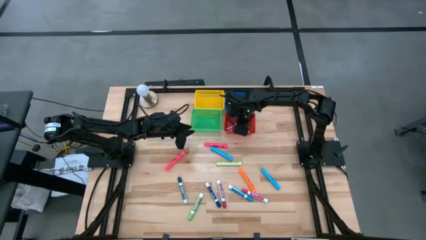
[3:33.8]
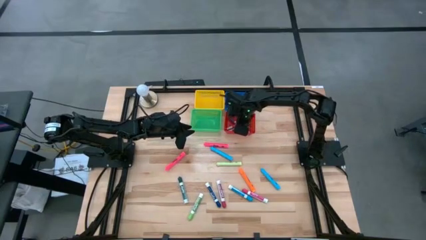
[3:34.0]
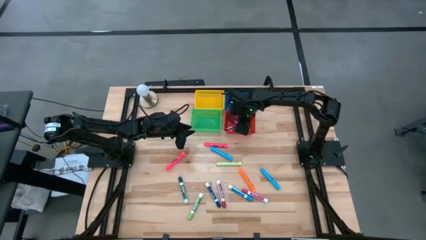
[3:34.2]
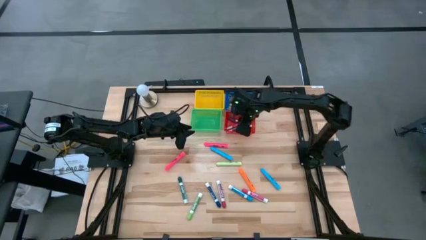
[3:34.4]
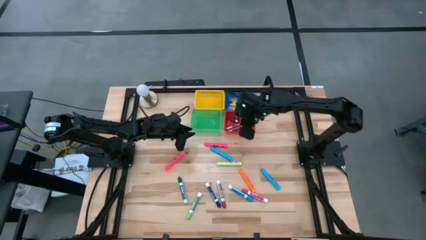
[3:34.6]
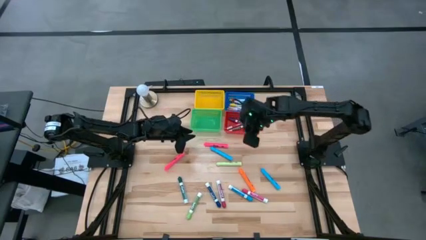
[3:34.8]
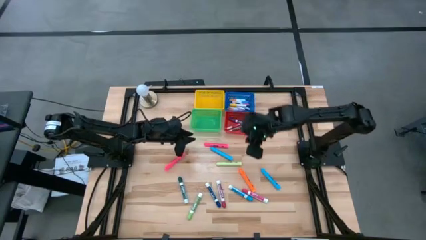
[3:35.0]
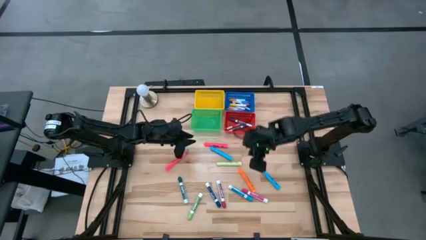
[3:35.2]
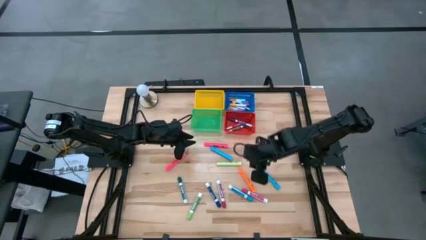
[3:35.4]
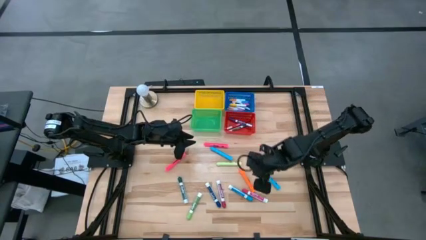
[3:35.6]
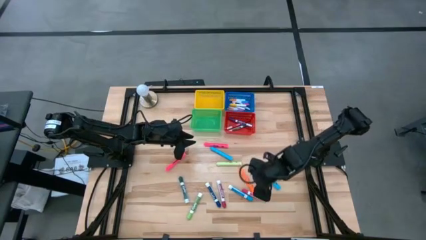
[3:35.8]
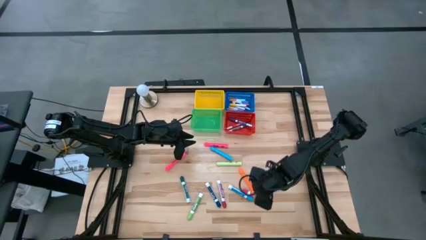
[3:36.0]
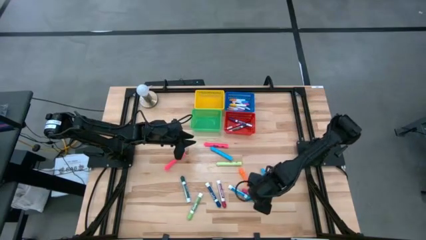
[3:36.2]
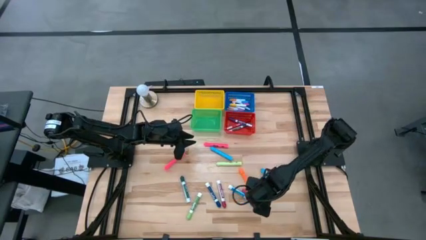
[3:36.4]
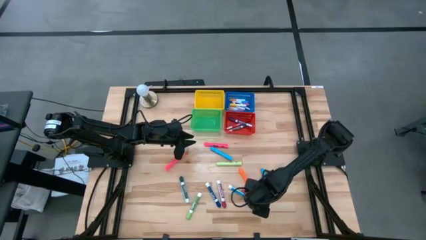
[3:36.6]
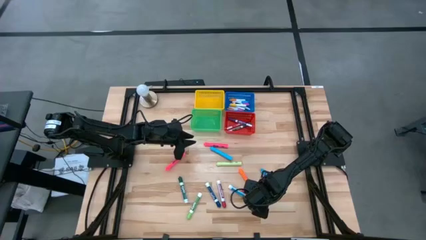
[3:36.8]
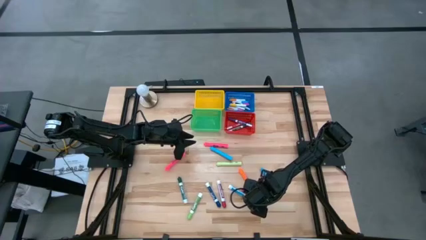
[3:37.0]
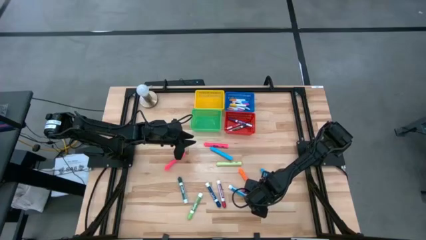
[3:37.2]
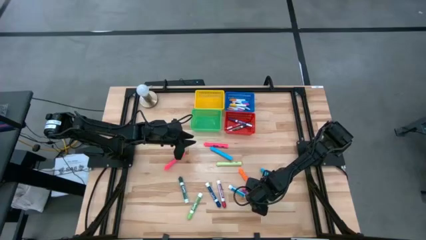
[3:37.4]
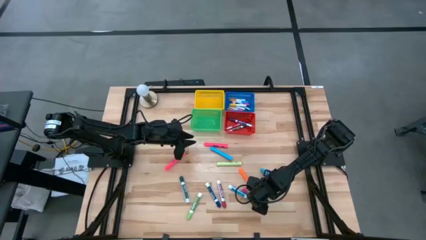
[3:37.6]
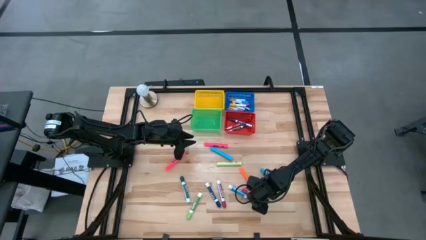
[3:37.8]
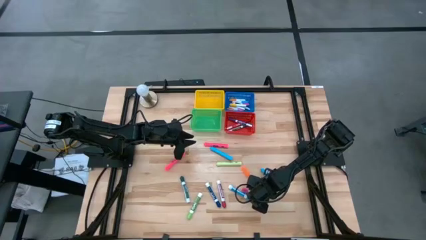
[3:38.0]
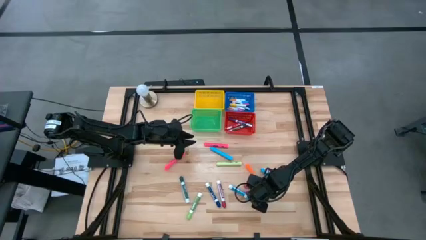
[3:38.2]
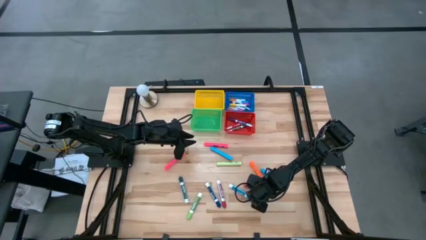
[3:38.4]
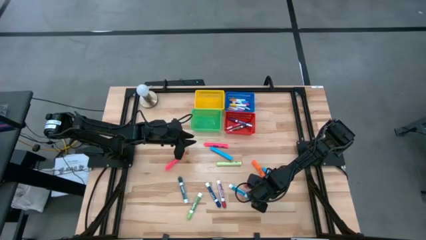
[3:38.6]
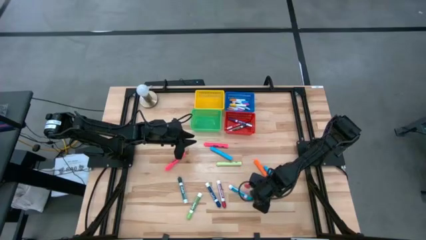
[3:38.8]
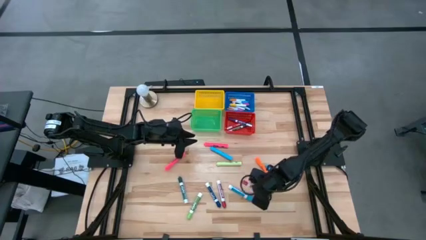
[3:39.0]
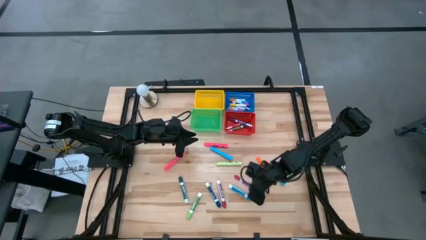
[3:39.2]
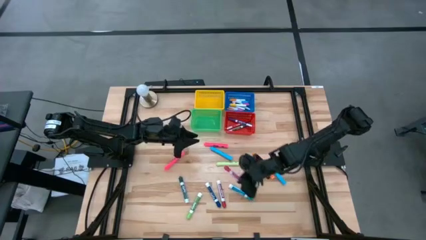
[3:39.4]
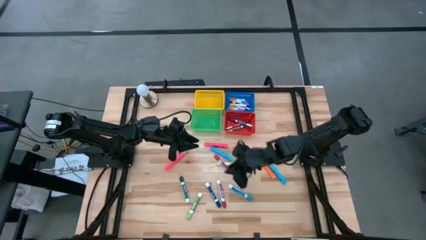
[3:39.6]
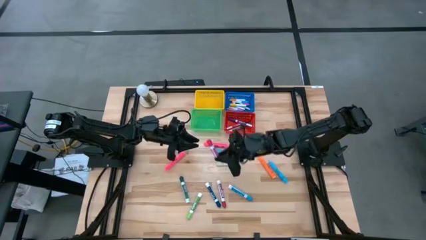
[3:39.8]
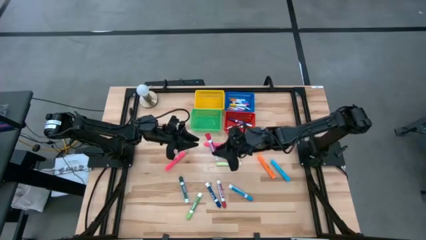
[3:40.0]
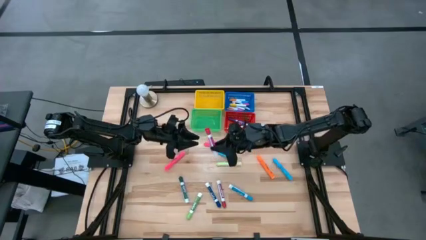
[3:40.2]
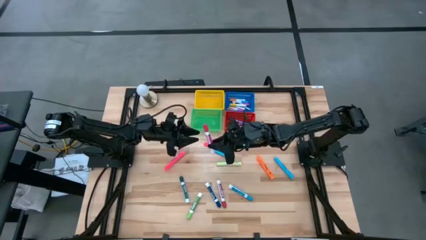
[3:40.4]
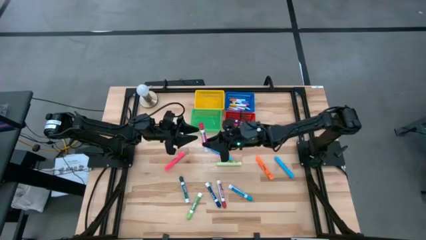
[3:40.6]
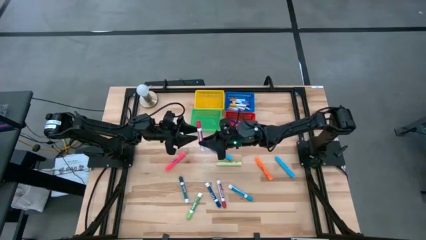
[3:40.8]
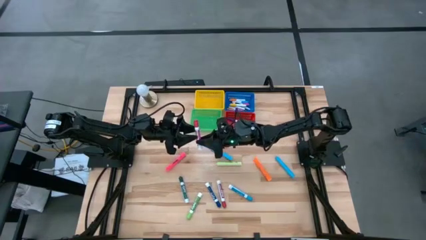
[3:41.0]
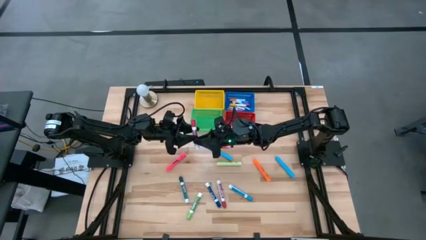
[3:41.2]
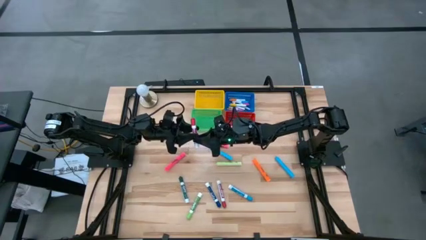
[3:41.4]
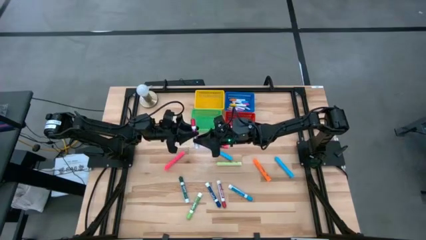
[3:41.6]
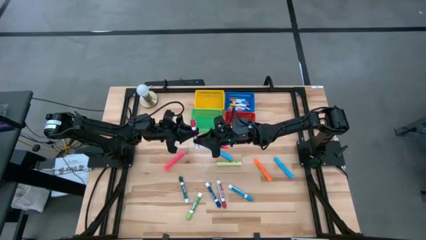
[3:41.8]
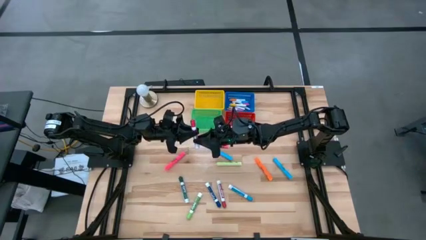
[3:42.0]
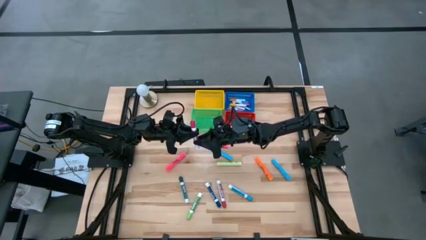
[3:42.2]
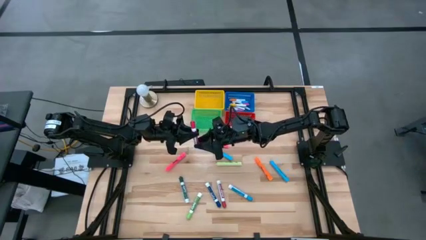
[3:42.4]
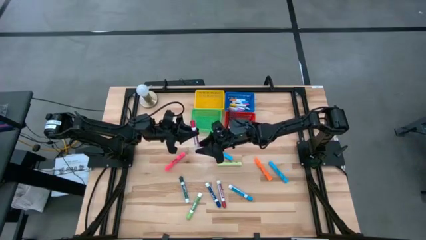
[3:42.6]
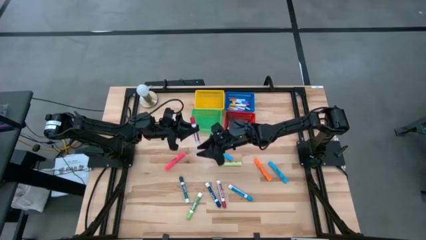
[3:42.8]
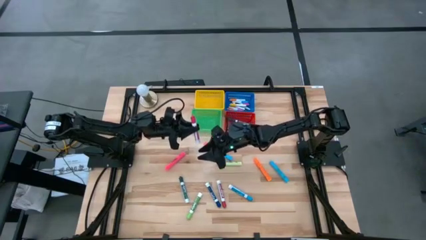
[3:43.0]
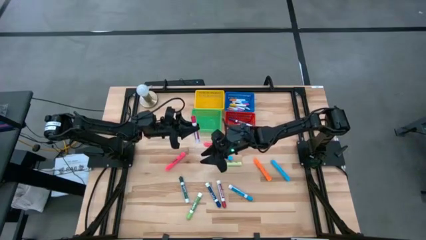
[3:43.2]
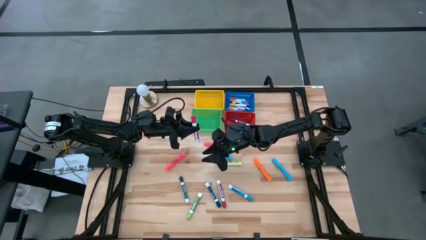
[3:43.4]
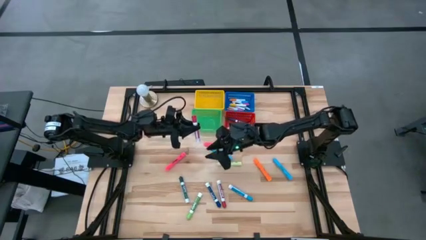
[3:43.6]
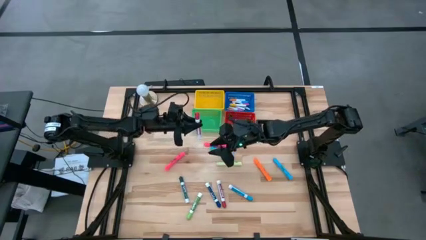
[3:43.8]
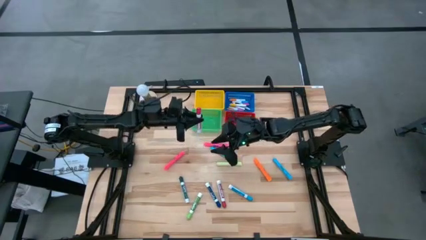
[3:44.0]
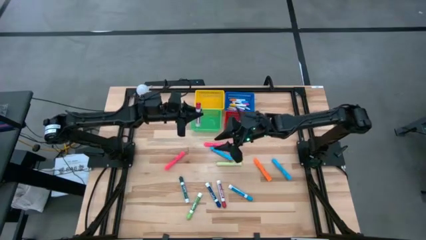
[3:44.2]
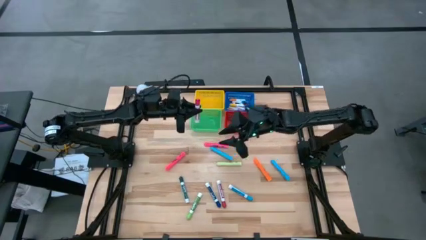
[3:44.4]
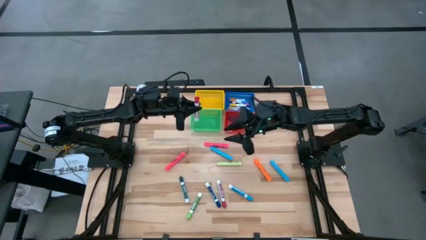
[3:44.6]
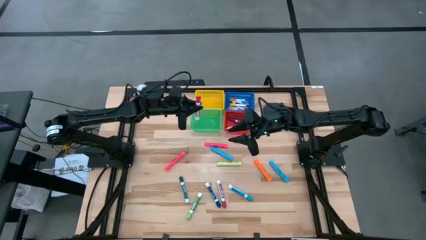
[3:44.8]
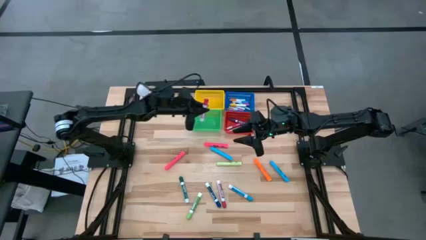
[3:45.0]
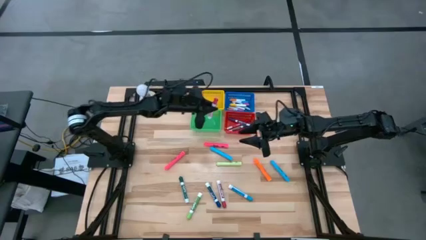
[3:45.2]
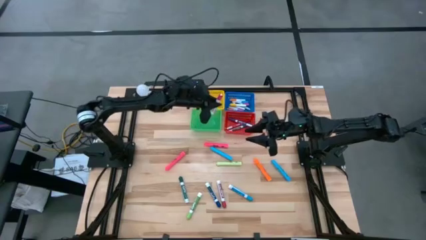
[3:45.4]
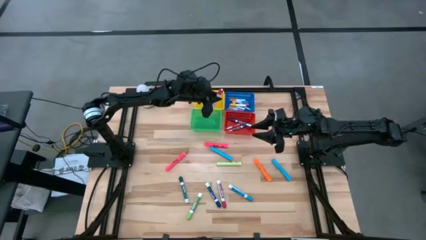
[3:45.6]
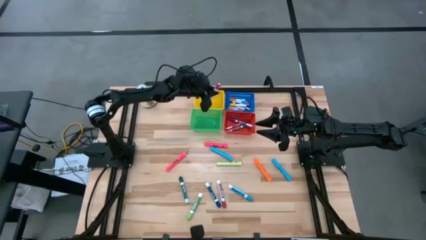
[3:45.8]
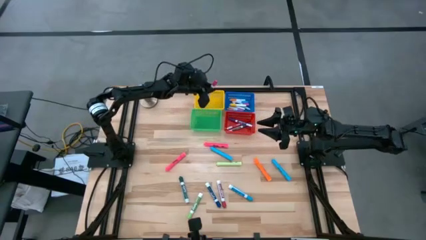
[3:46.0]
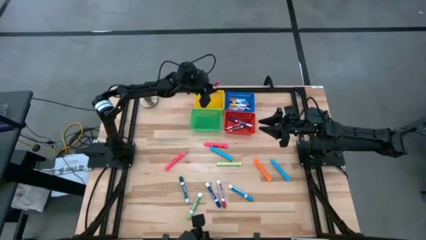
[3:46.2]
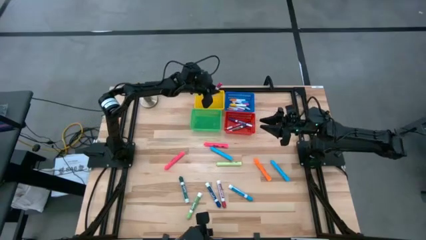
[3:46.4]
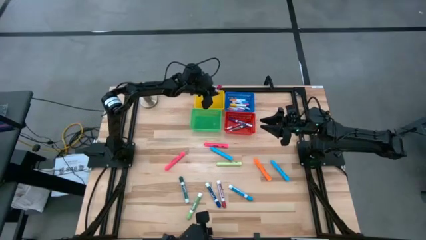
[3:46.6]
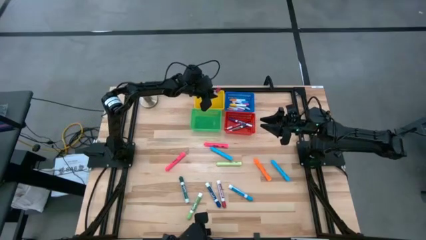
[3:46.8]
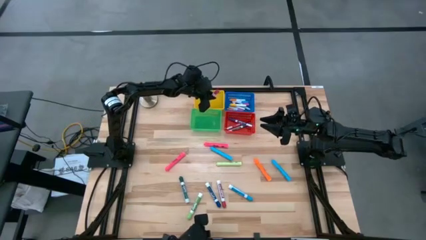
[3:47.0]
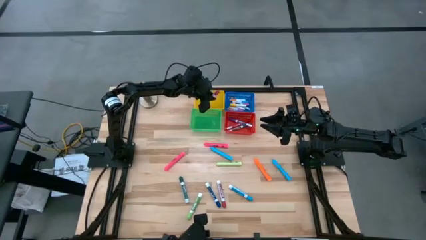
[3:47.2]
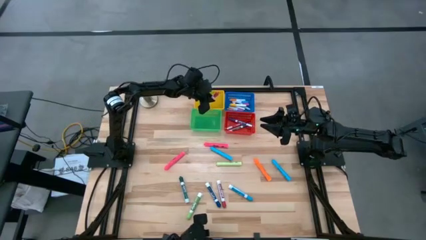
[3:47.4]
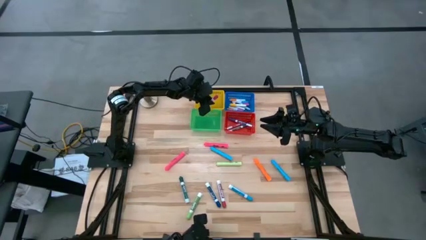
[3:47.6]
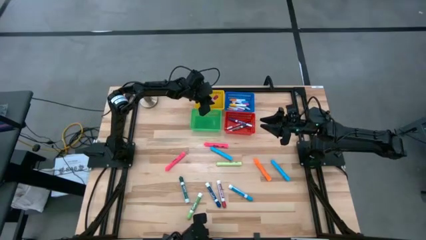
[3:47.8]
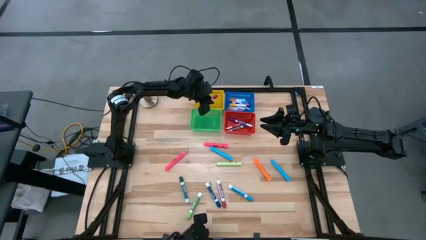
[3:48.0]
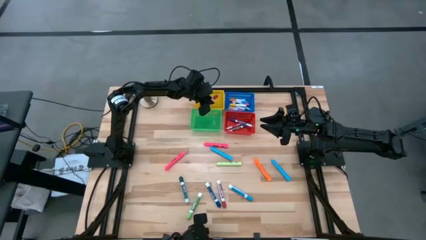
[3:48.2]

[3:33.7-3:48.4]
Task: Pick & Place Markers
Put the large pink marker pen into the yellow bin
